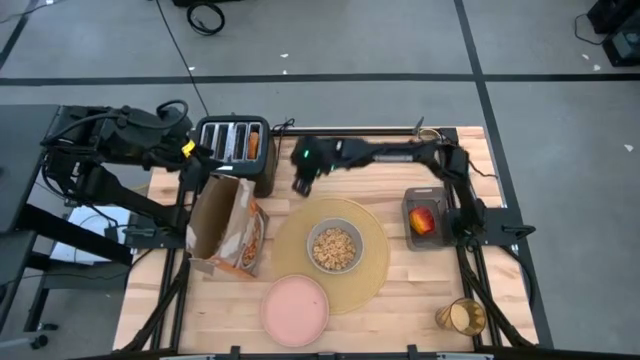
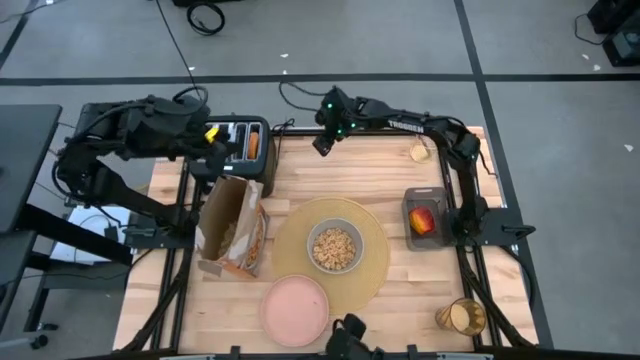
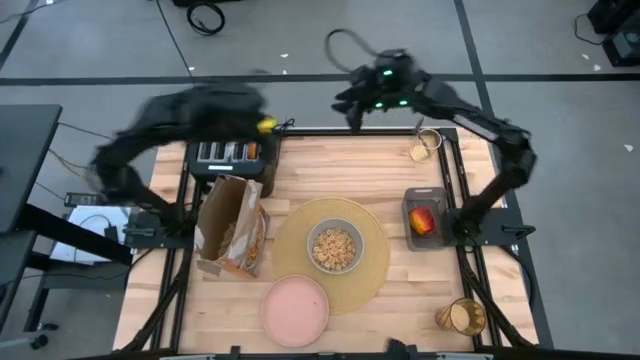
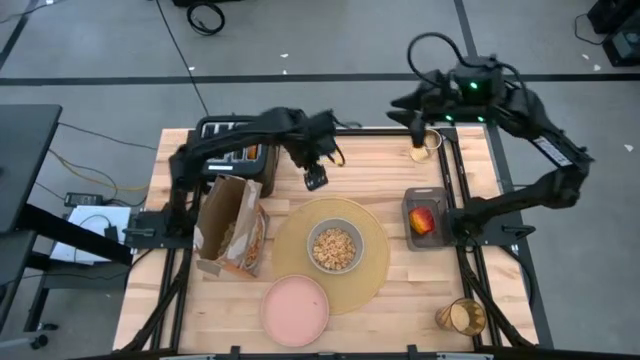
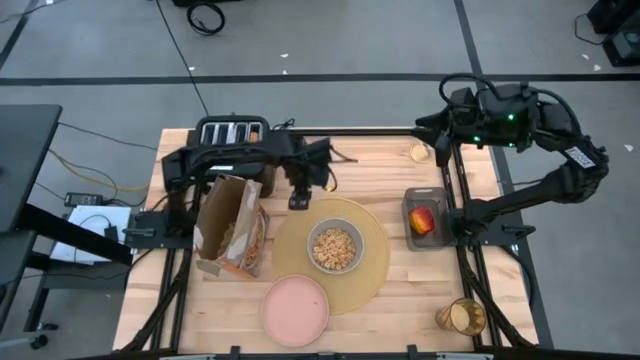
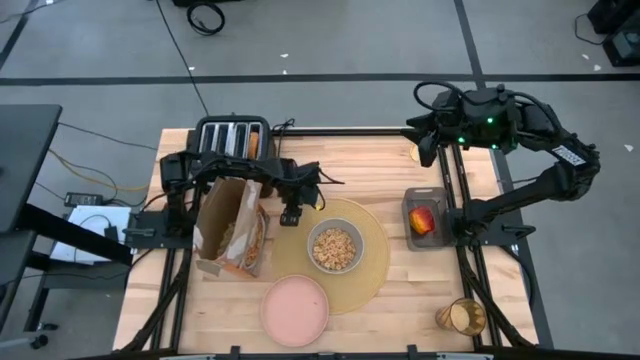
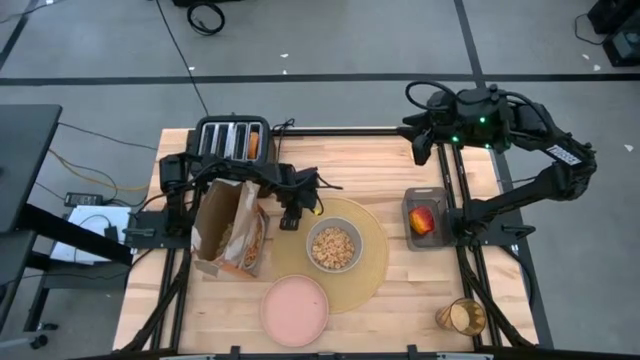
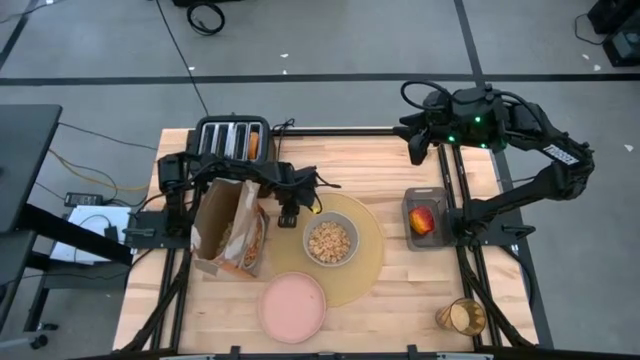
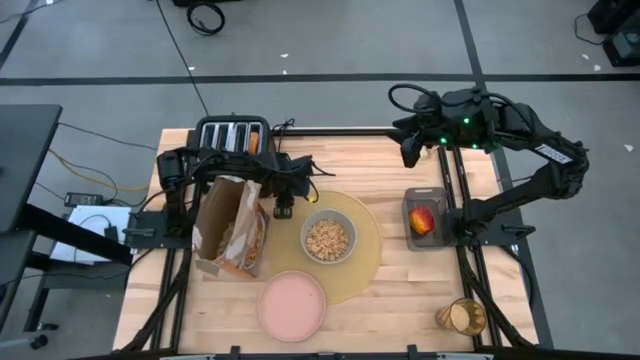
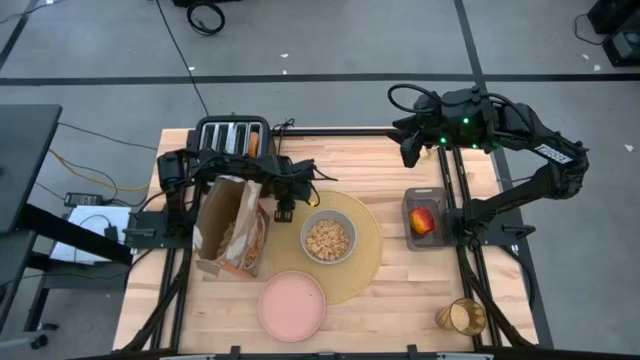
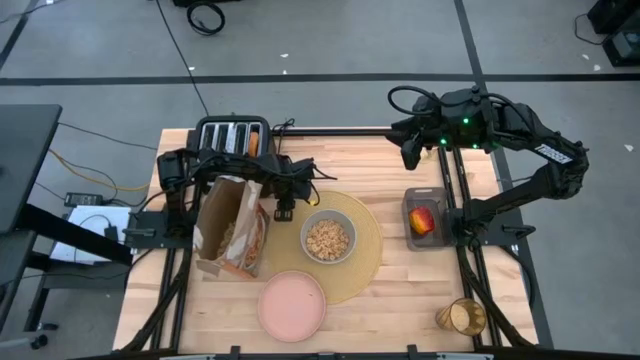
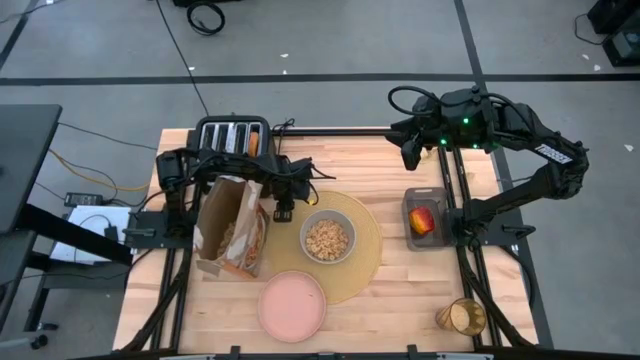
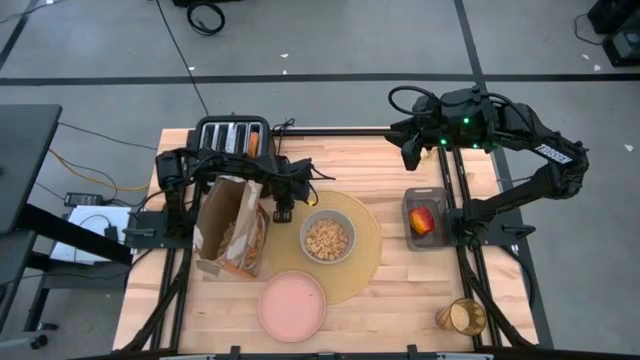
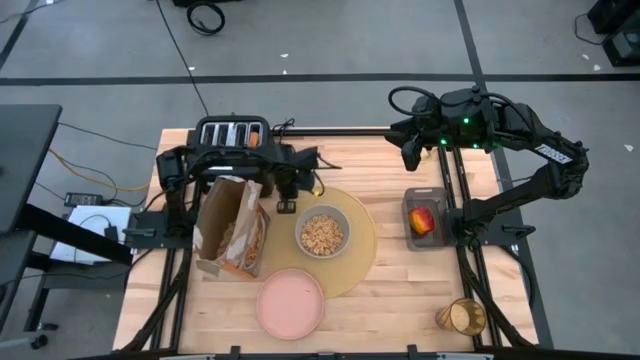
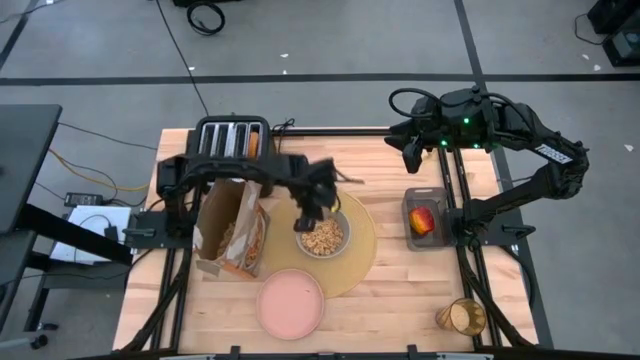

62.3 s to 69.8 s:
Task: Arrange a breakfast setting
Put the cereal flake in the gray bowl

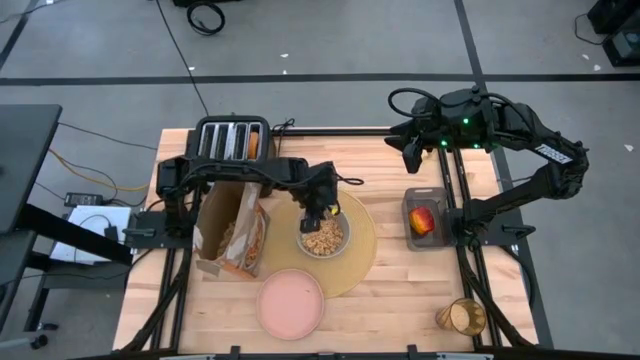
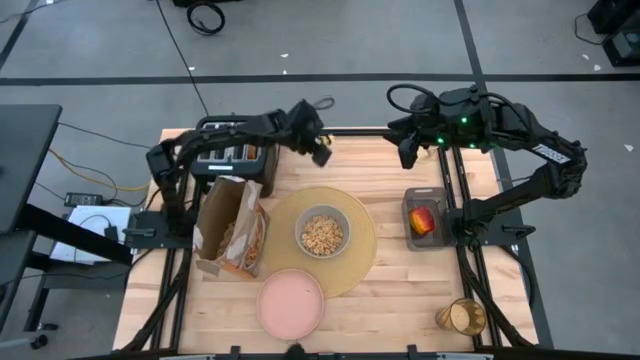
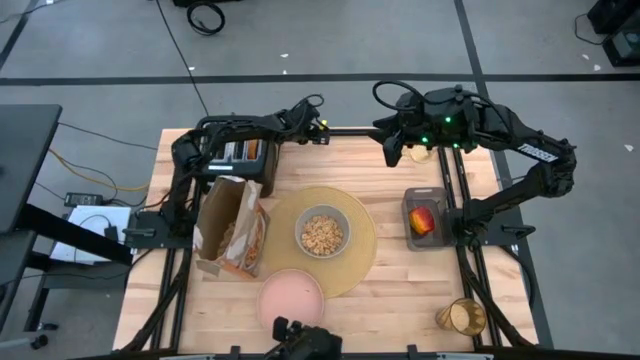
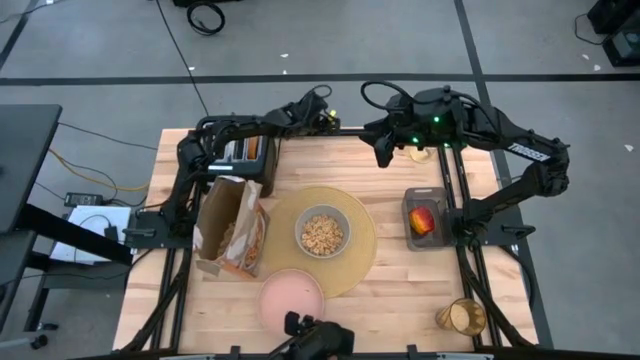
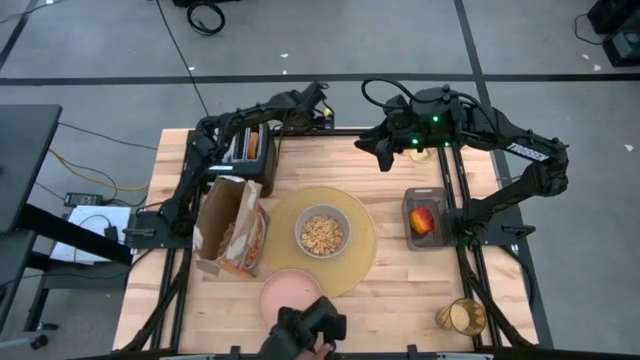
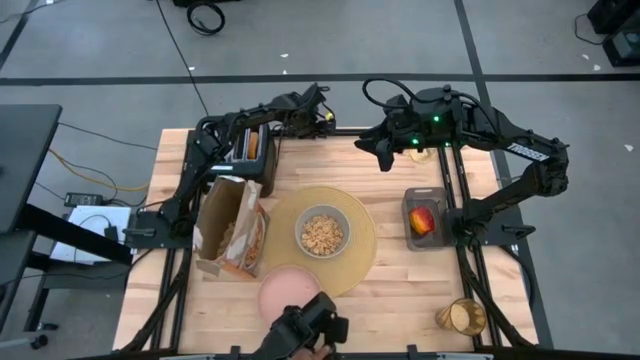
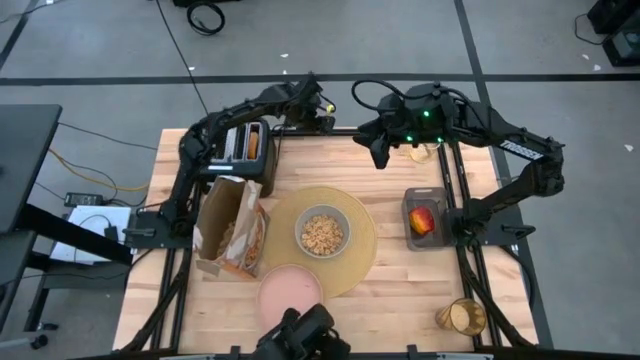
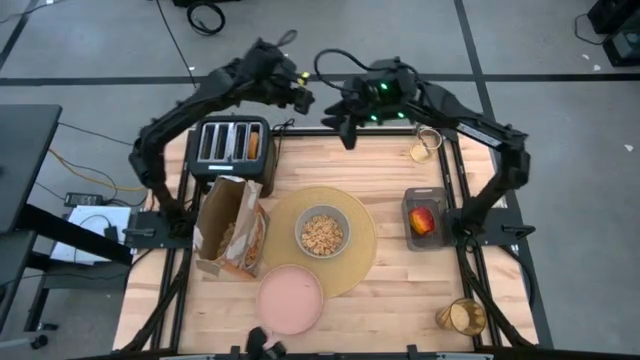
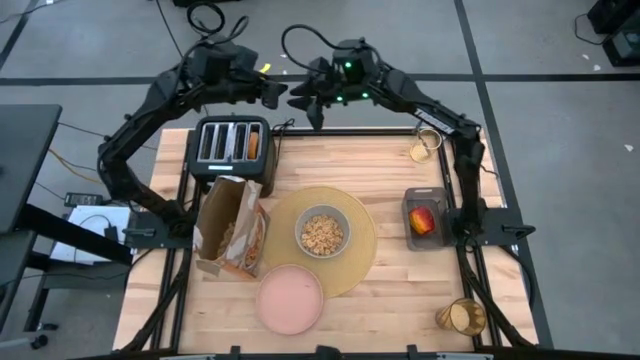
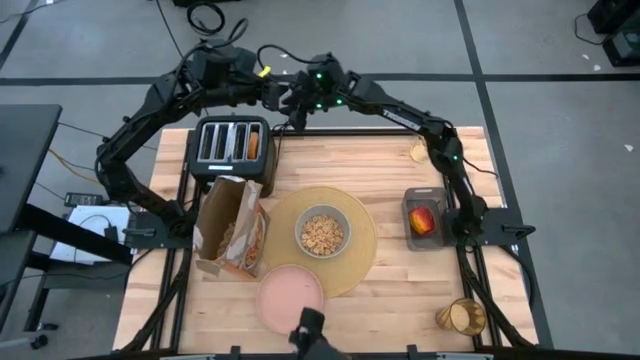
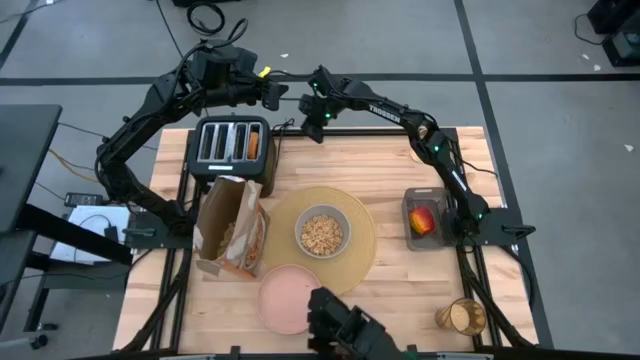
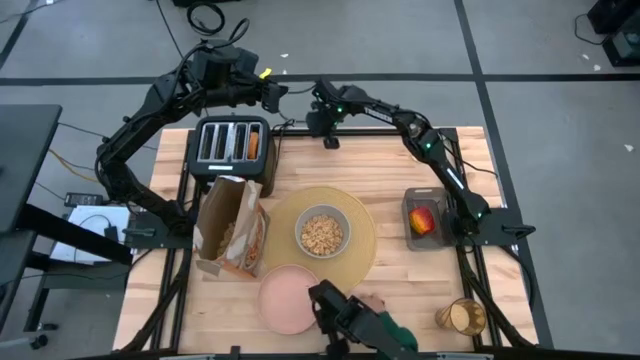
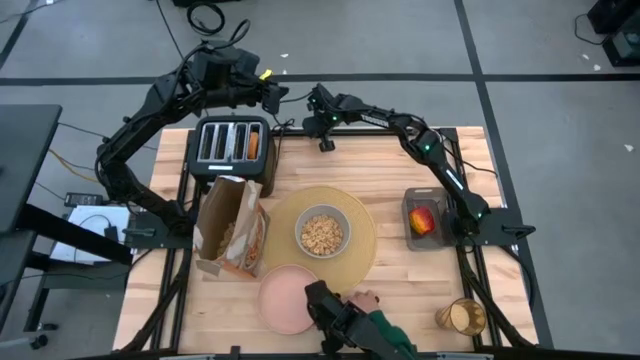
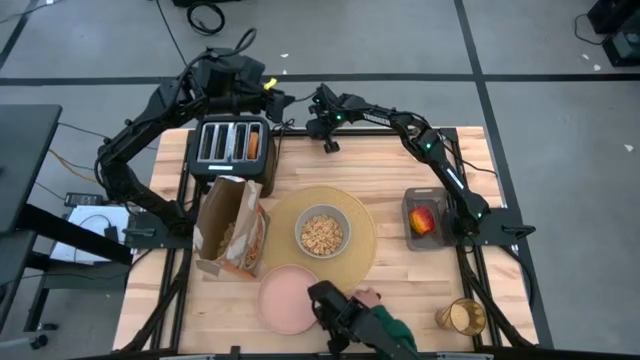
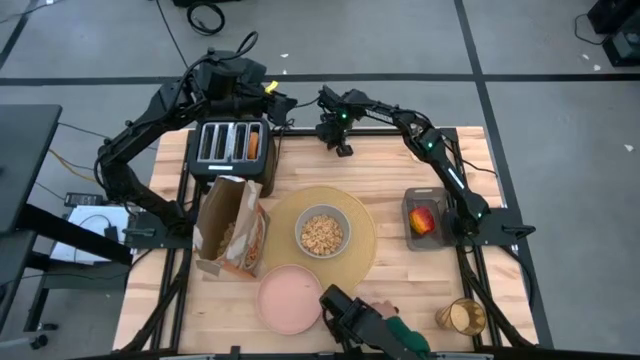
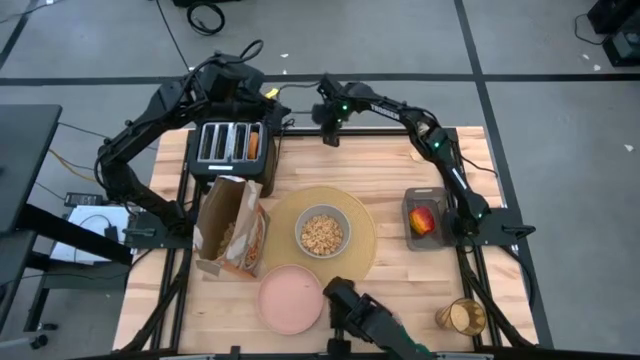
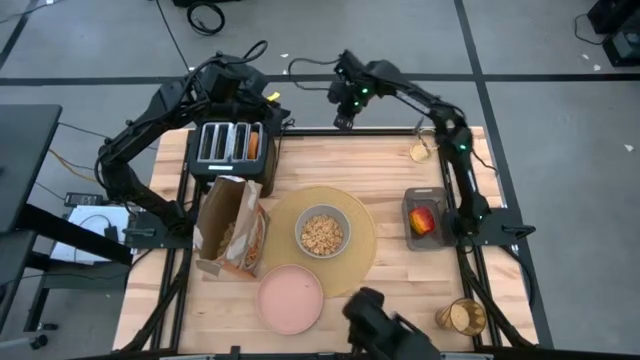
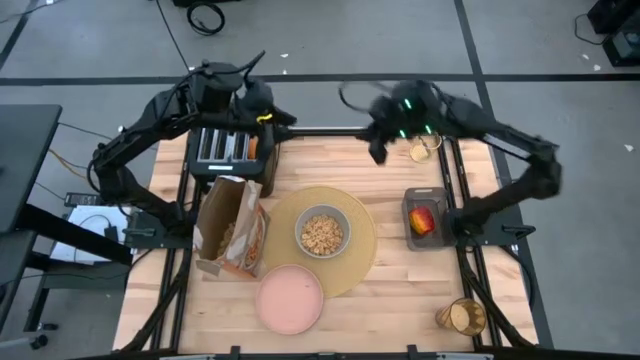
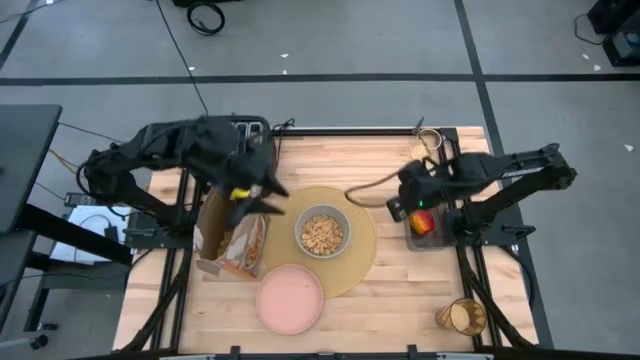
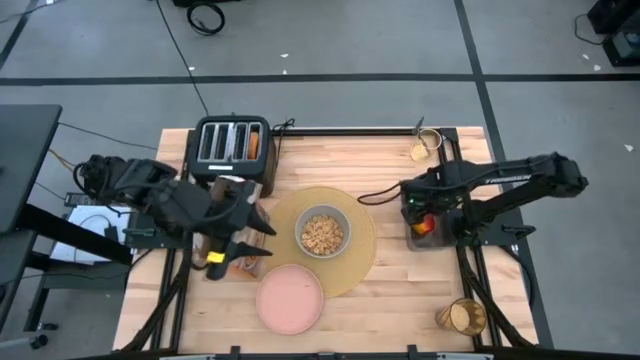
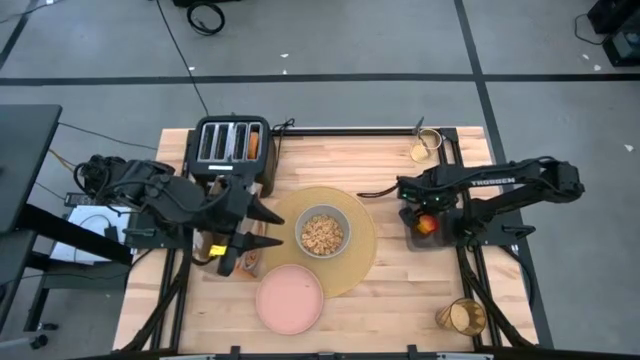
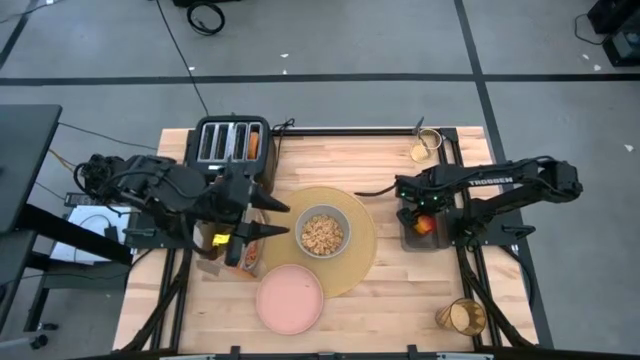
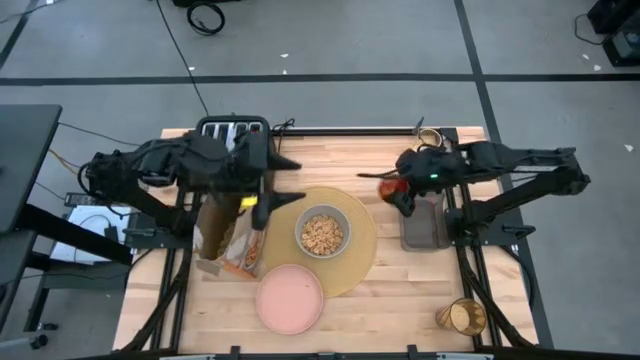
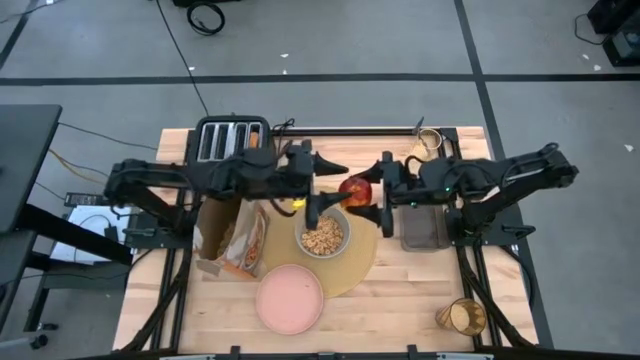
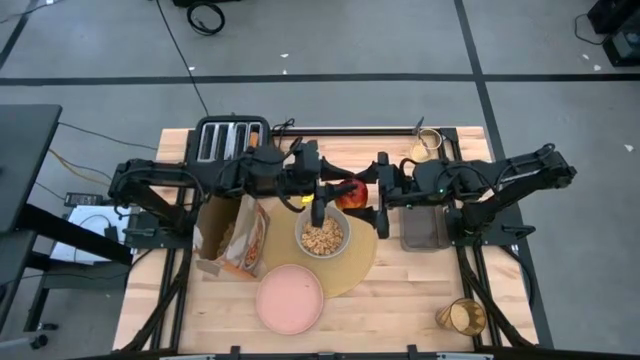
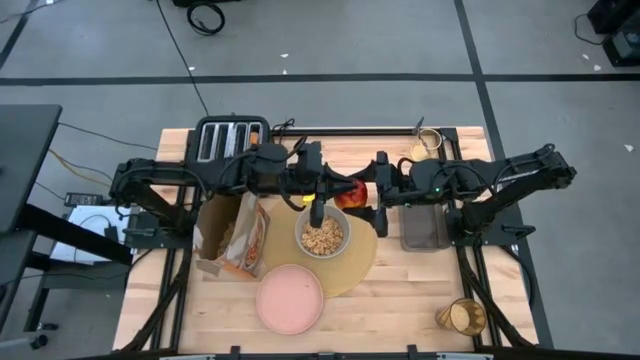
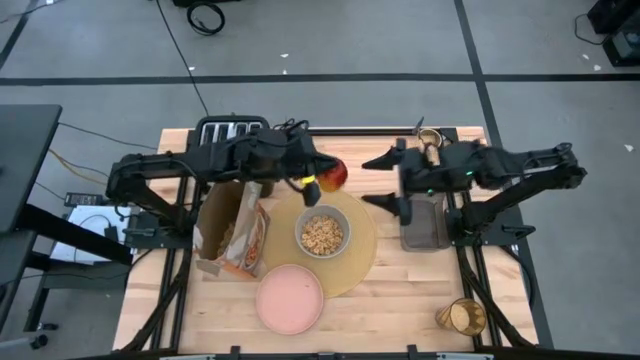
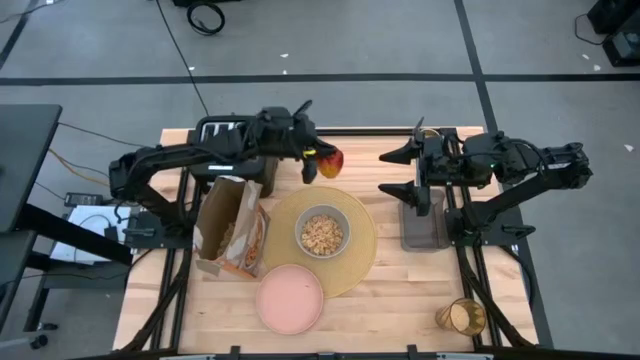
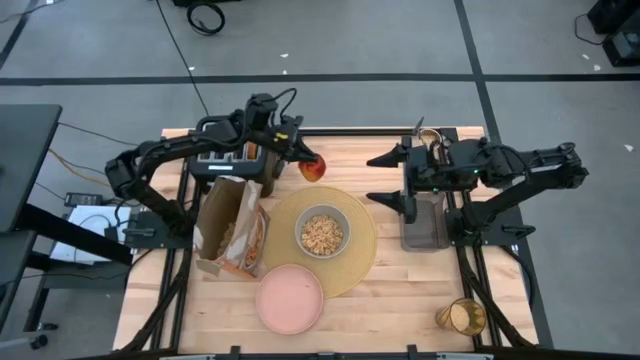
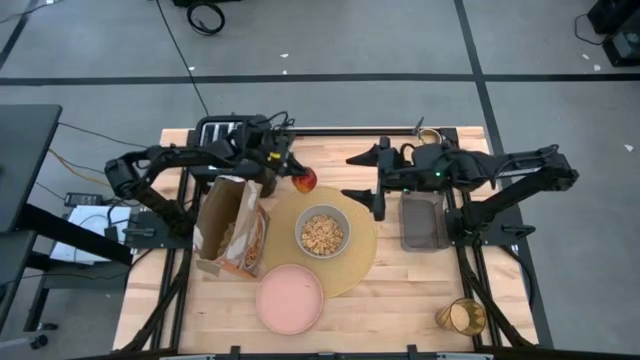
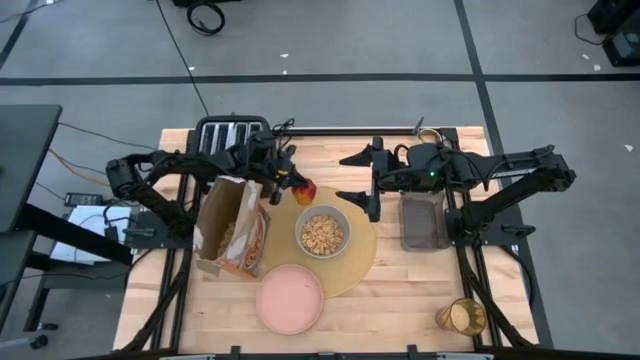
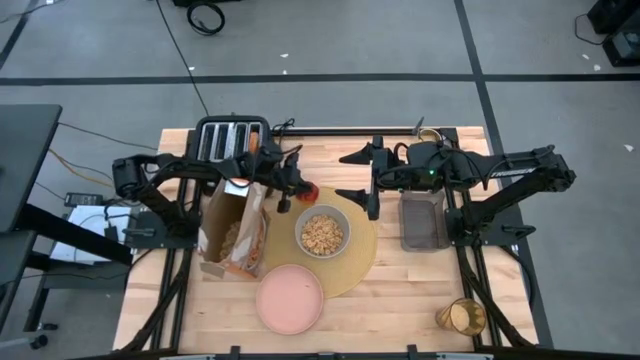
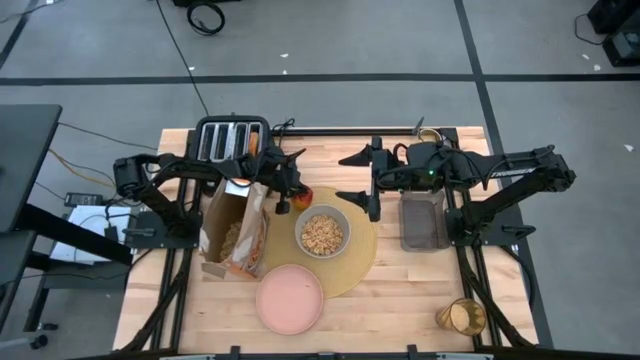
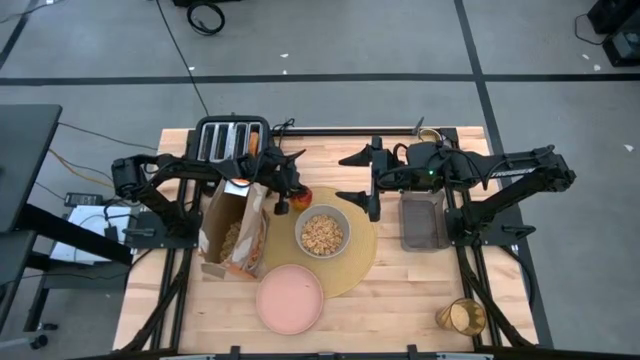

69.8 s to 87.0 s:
Put the apple on the top left of the gray bowl on the yellow placemat
